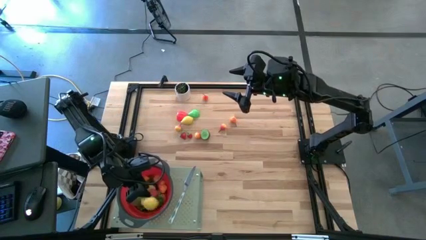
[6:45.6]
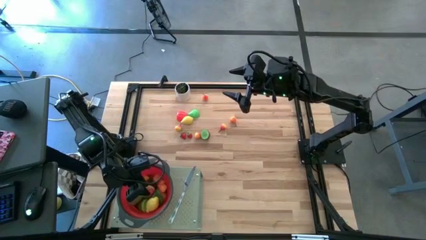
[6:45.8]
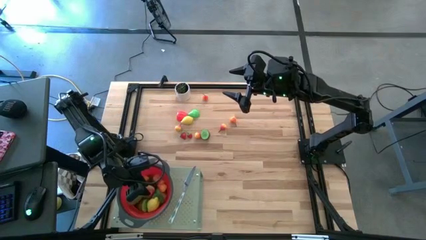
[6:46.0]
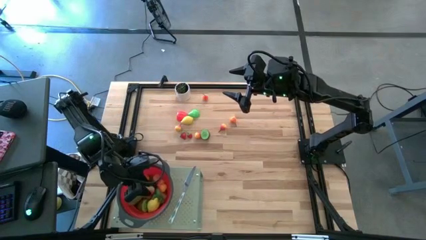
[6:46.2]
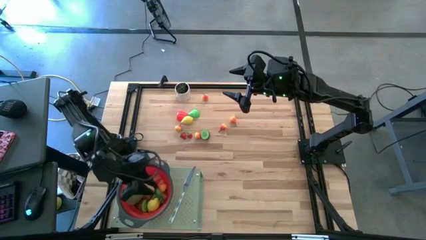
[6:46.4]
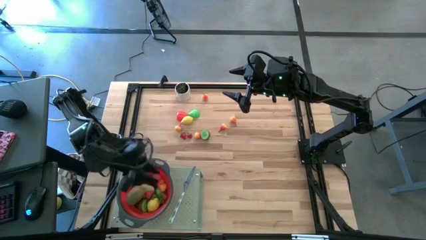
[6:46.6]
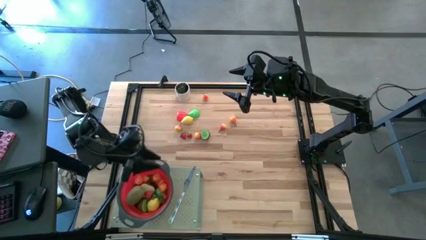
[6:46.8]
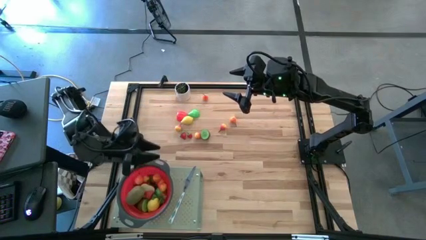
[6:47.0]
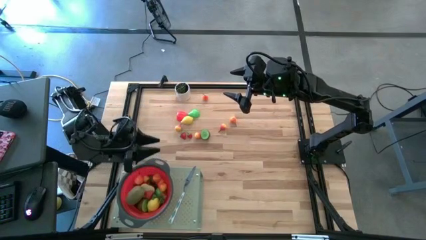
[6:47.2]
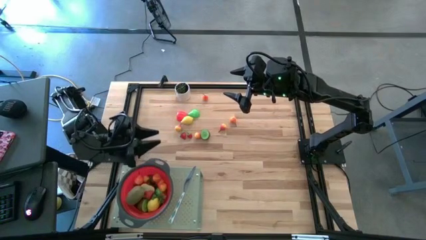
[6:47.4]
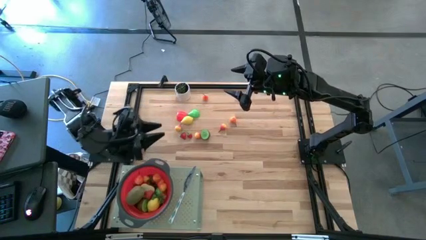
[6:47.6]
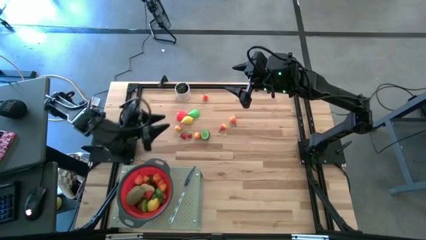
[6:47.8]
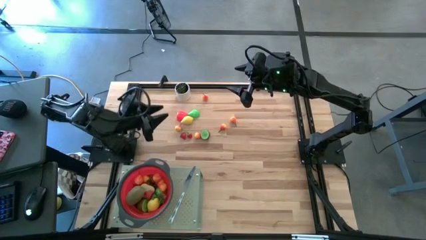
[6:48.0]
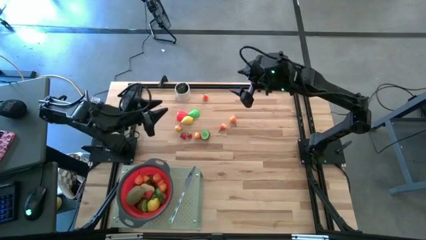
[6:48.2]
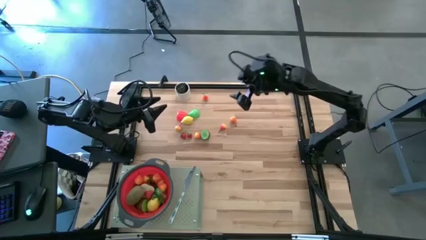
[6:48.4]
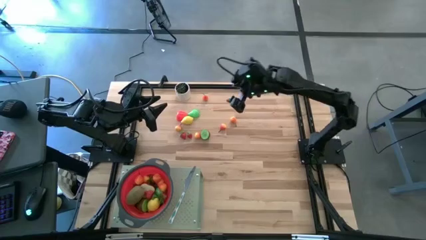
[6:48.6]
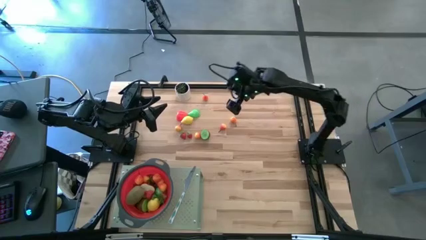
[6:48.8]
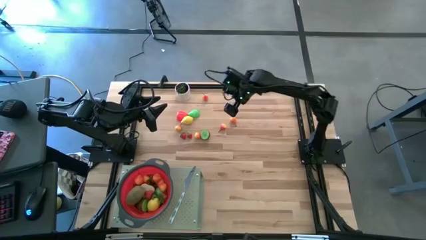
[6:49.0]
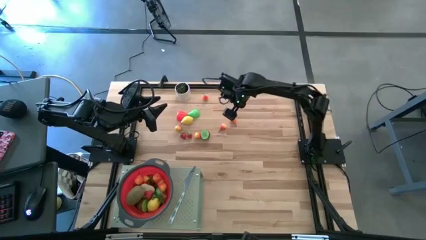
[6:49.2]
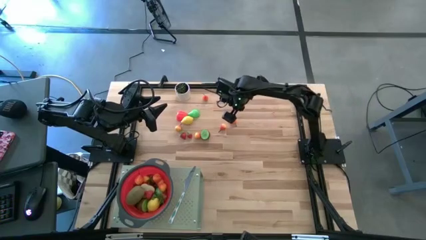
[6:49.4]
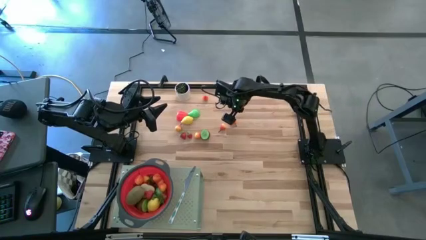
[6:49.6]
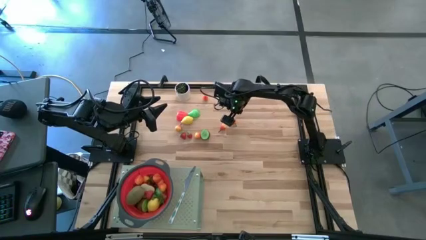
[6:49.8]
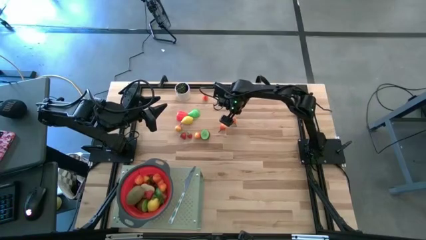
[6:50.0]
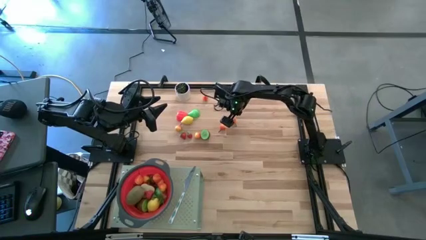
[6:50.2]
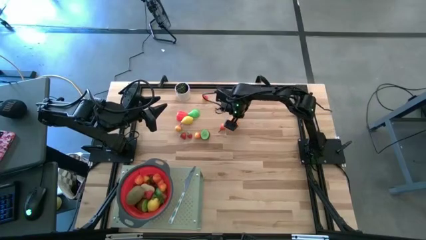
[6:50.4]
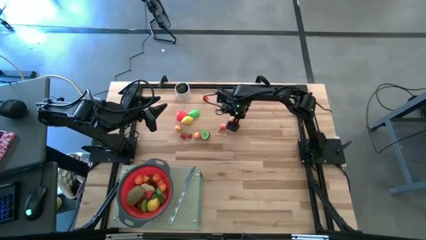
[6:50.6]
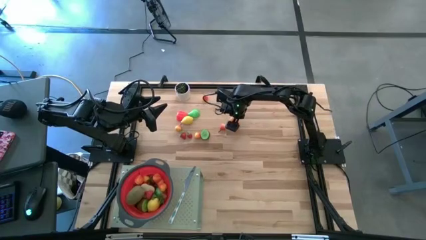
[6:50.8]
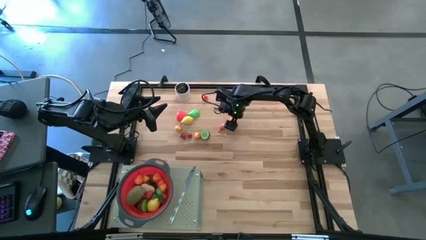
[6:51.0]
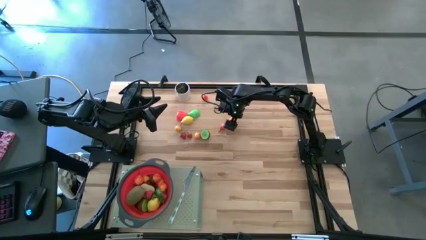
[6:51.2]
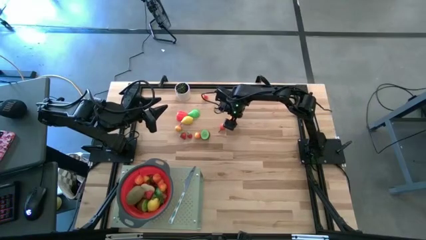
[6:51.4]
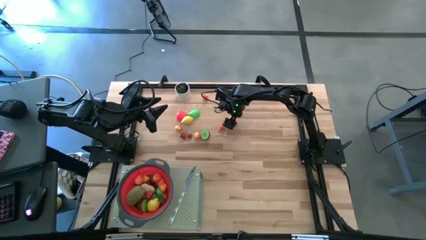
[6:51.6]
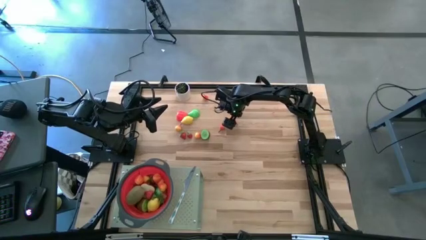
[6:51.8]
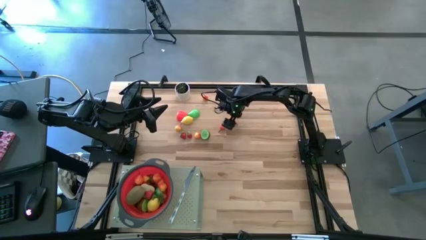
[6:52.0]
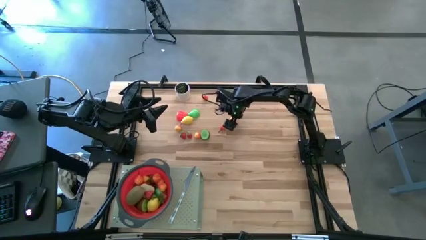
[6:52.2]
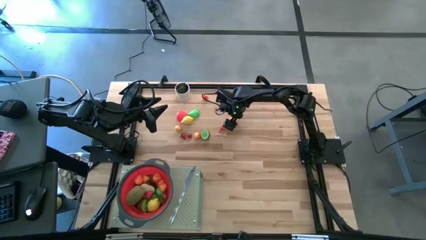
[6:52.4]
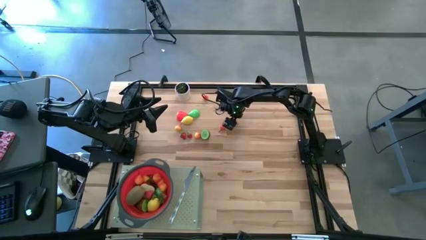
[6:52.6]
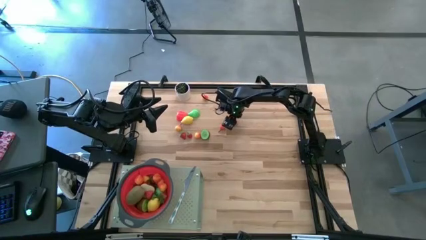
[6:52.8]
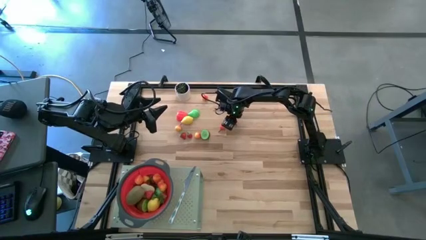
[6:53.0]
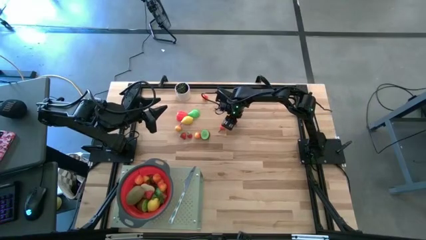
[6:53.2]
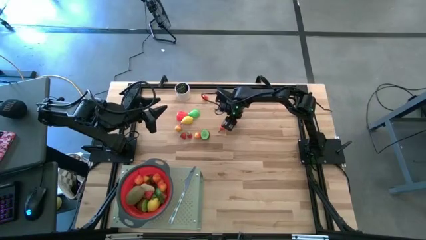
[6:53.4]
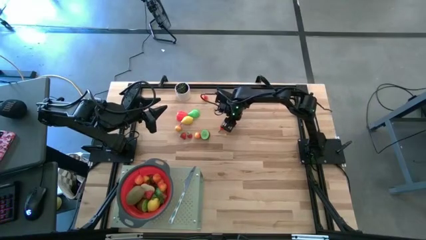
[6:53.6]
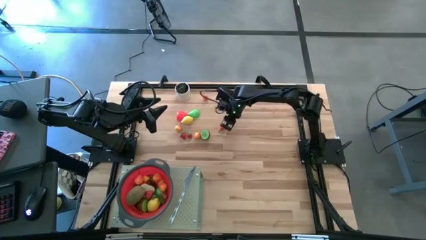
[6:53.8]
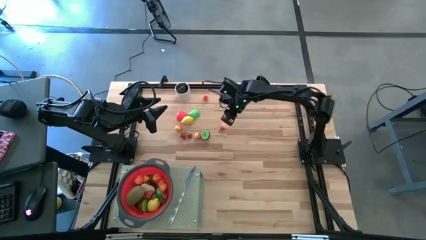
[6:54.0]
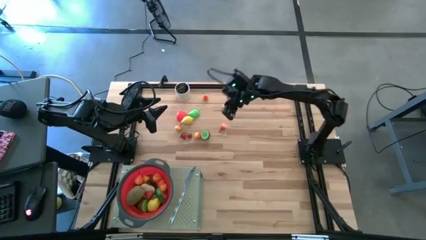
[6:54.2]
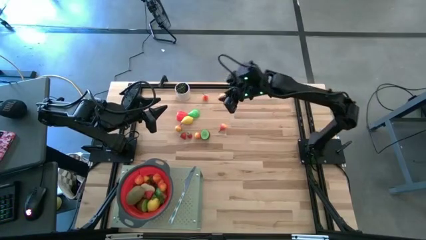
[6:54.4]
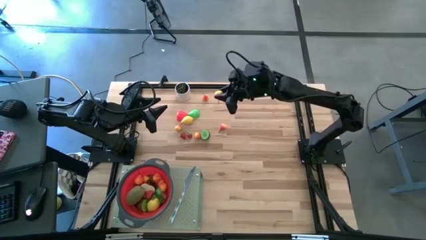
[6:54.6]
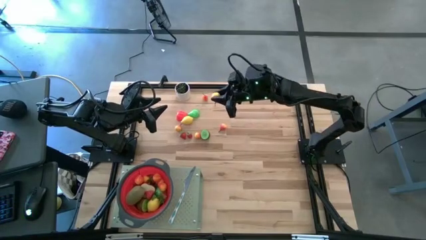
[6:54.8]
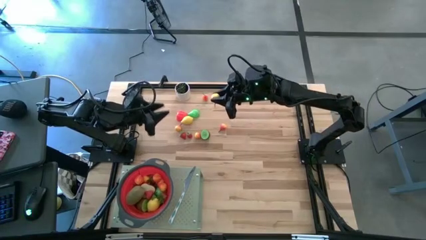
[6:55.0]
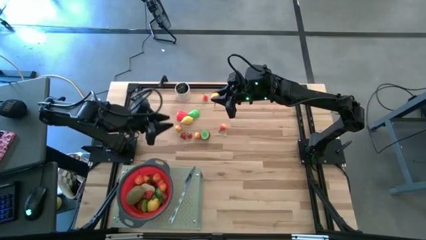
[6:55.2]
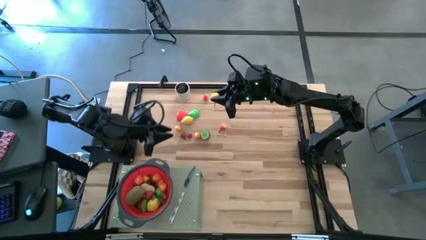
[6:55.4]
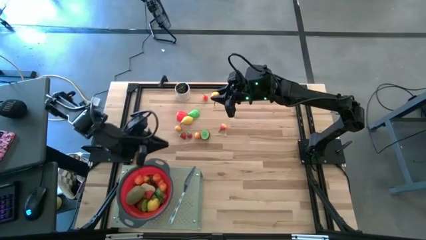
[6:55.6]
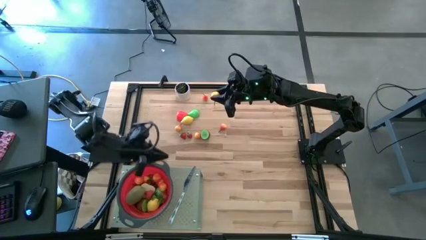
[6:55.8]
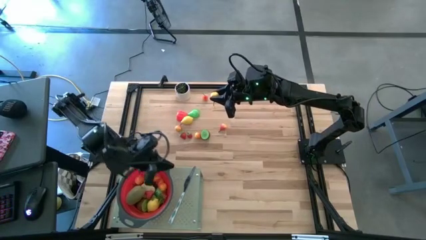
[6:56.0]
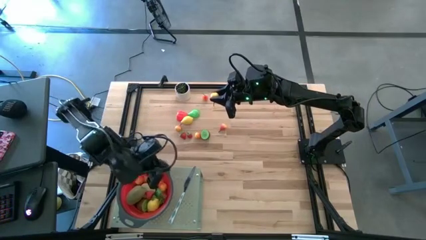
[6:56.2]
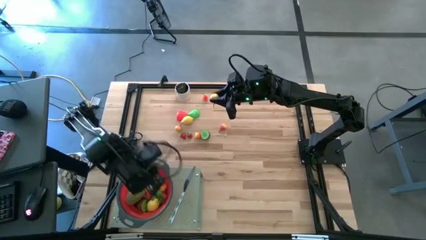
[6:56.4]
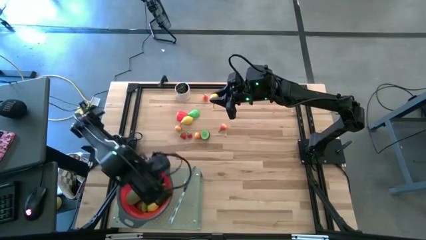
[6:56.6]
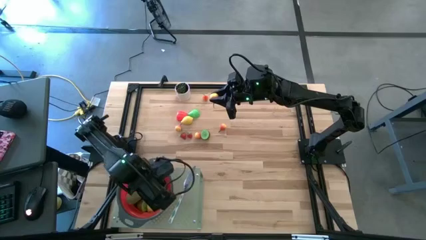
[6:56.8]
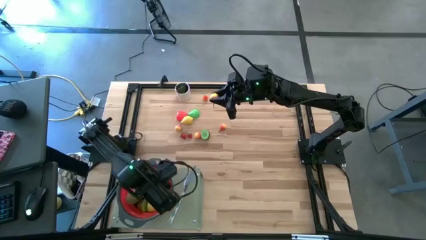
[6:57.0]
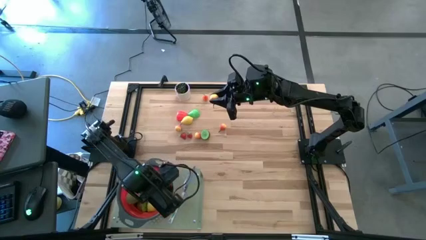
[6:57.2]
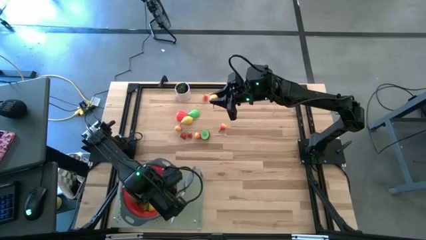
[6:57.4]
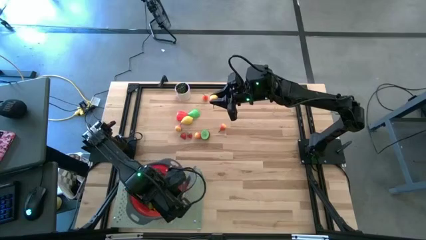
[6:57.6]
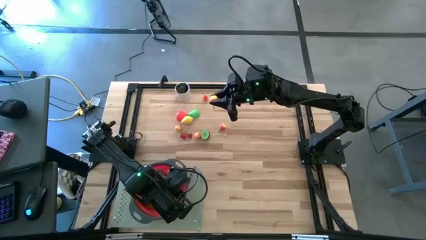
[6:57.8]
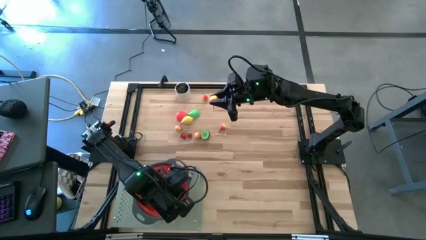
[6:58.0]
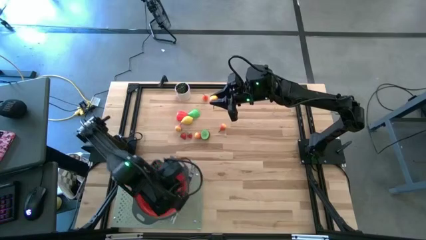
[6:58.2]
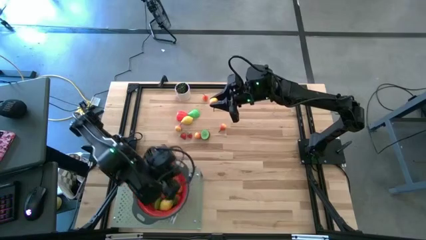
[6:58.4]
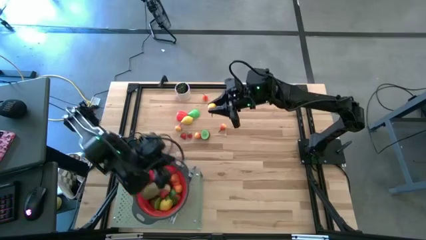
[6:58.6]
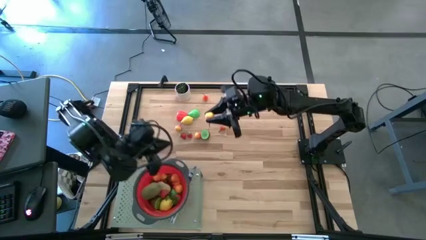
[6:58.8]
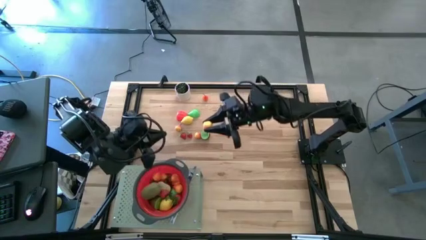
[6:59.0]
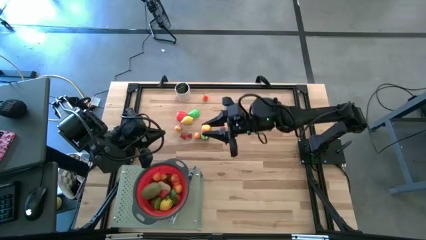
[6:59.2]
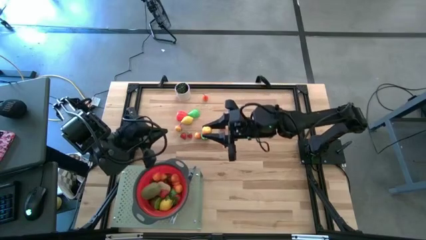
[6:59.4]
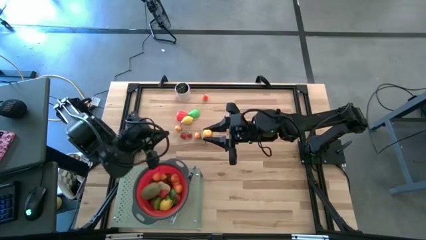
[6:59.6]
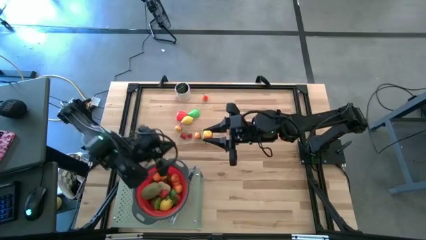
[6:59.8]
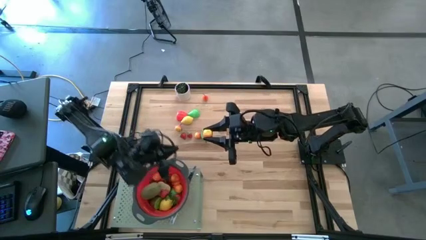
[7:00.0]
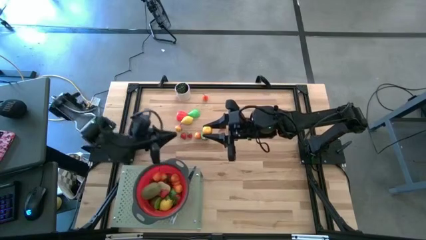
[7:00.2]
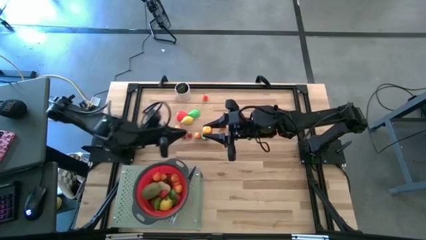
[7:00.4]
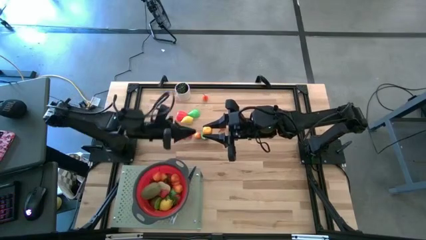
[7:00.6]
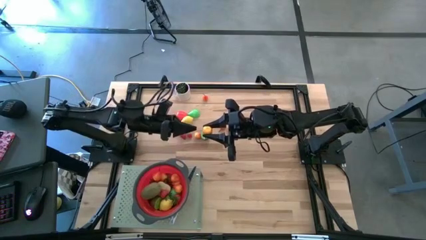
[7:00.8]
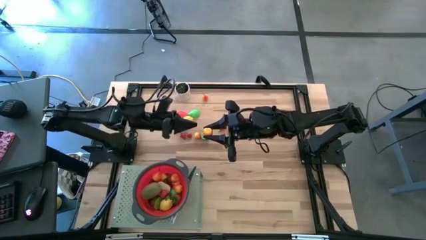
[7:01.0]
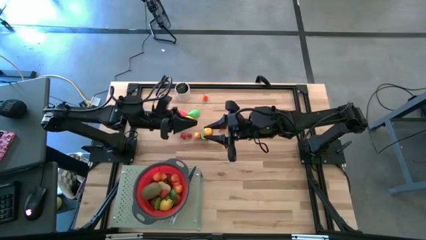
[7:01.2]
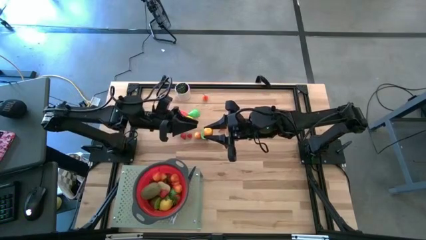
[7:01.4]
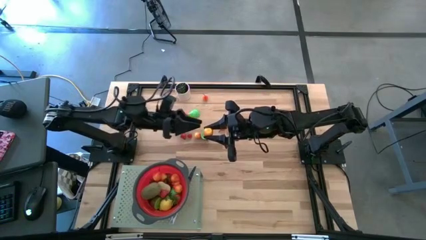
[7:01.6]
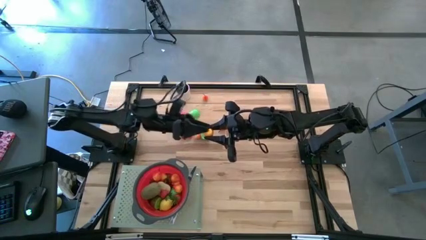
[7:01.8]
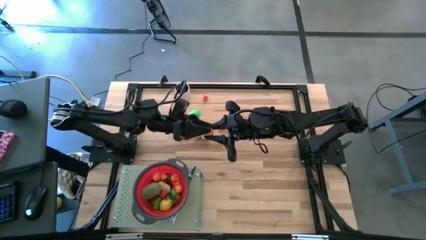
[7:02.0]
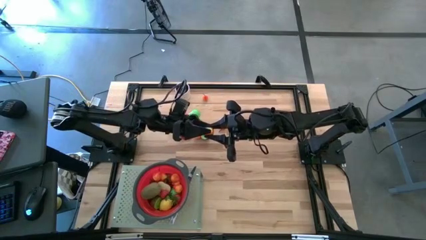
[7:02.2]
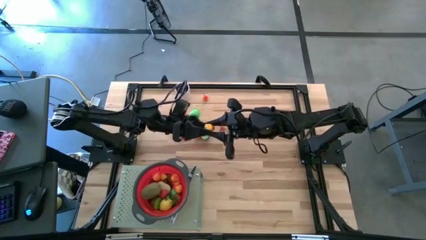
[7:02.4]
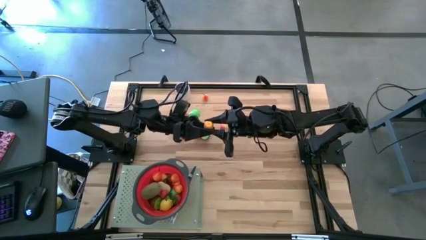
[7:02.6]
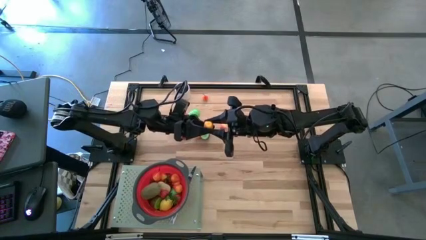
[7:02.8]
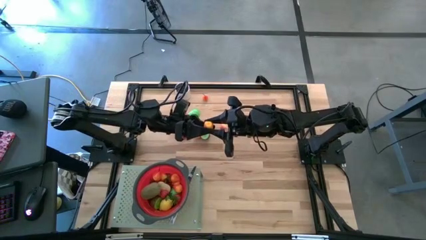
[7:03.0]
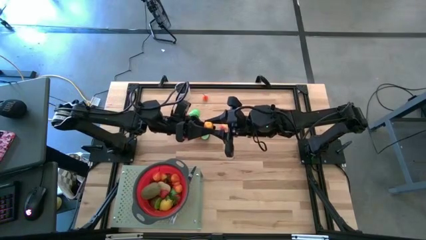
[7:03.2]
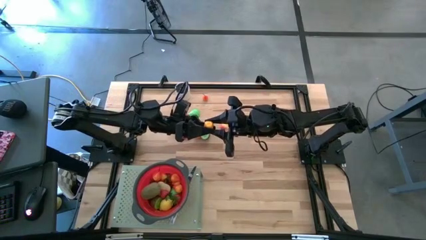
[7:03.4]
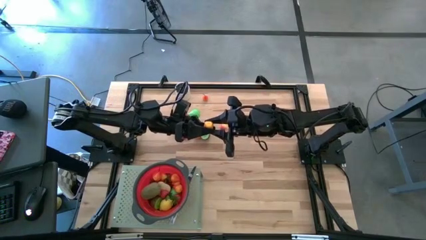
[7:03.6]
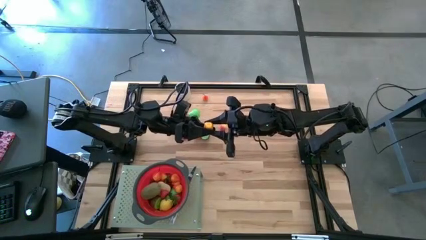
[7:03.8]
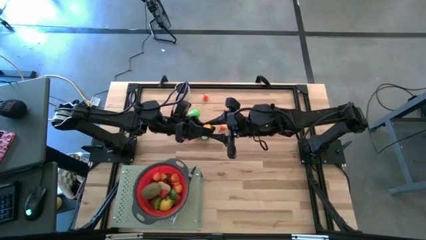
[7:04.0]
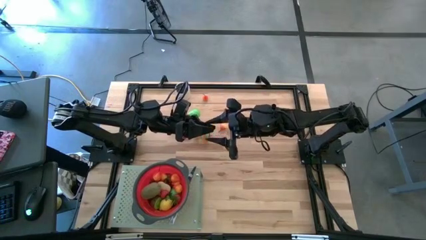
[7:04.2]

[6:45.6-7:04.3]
Task: Pick & Place Fruit
Put the pear into the red strainer bowl on the shelf
